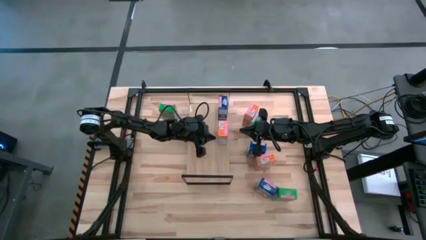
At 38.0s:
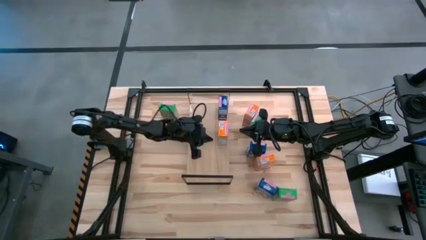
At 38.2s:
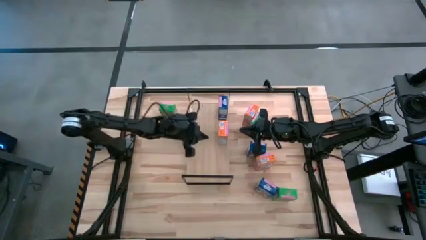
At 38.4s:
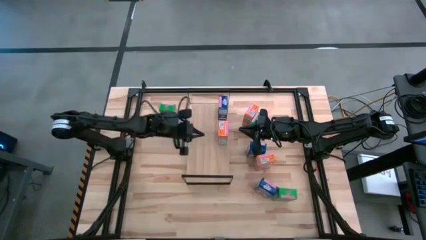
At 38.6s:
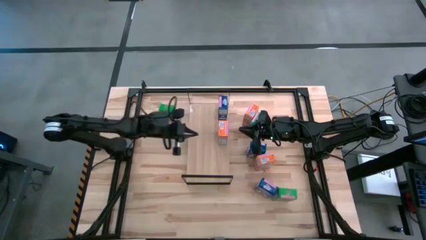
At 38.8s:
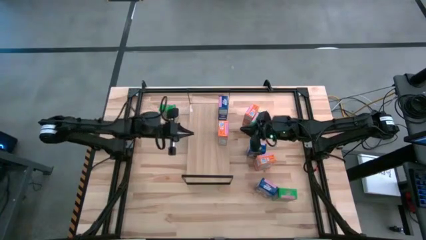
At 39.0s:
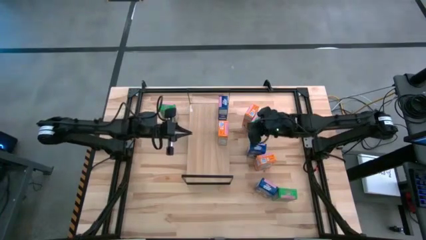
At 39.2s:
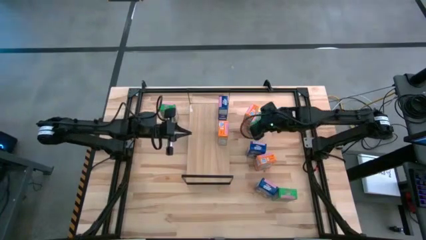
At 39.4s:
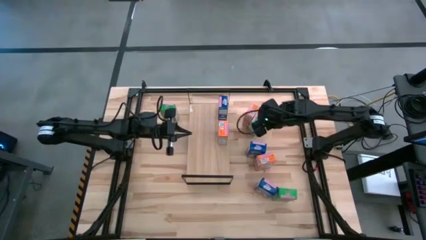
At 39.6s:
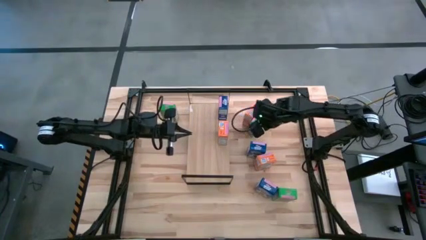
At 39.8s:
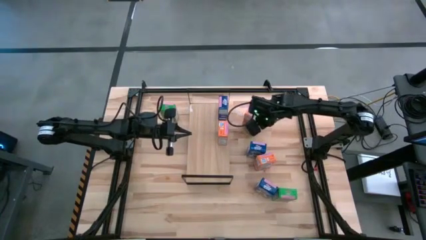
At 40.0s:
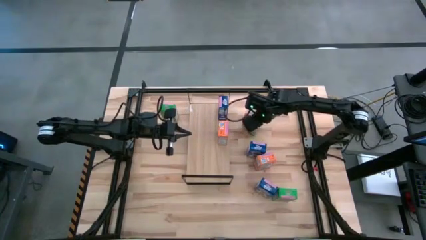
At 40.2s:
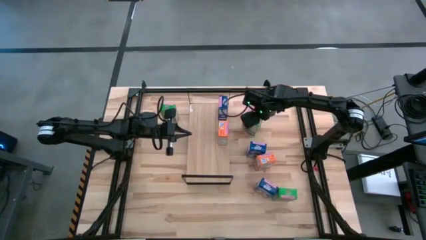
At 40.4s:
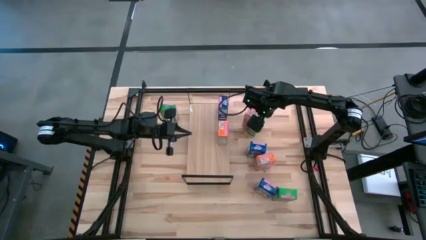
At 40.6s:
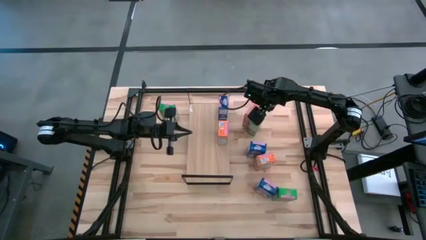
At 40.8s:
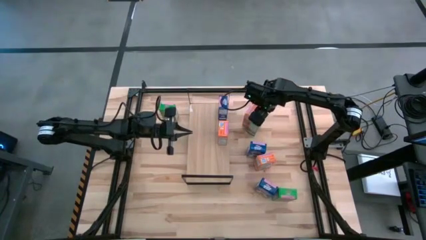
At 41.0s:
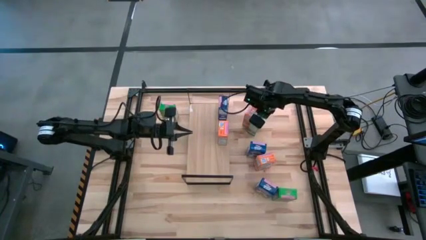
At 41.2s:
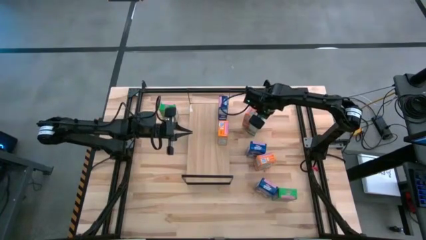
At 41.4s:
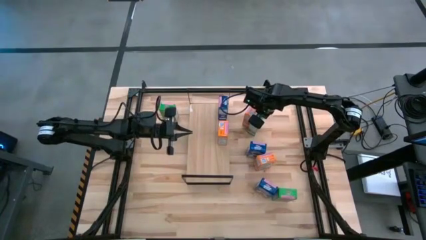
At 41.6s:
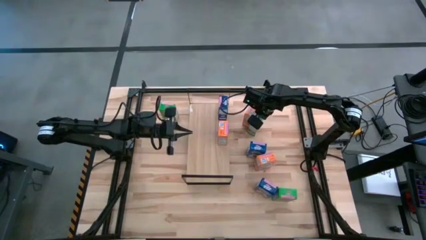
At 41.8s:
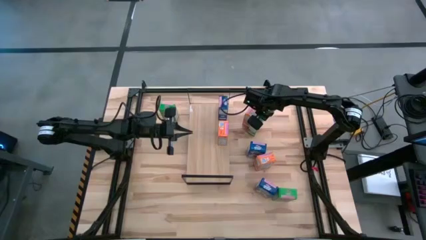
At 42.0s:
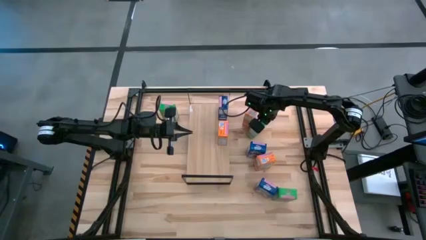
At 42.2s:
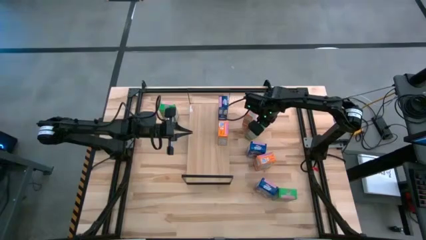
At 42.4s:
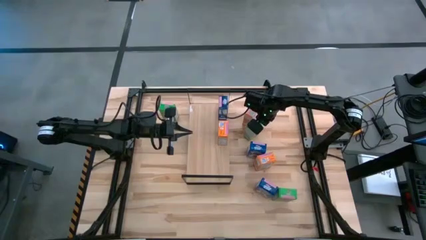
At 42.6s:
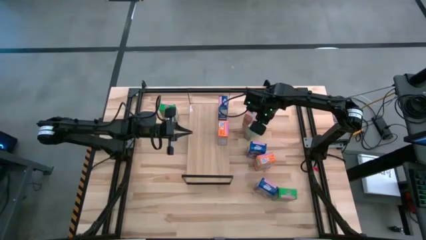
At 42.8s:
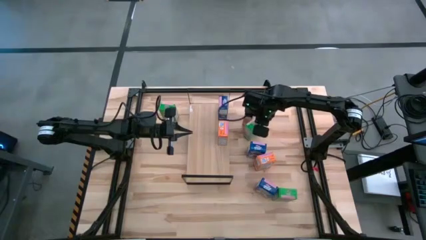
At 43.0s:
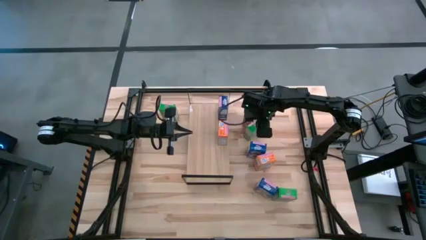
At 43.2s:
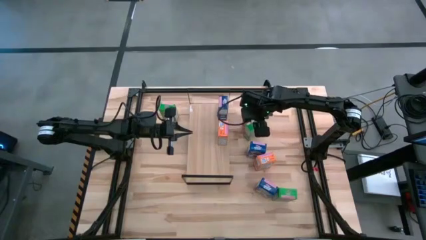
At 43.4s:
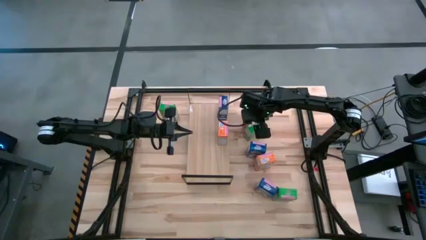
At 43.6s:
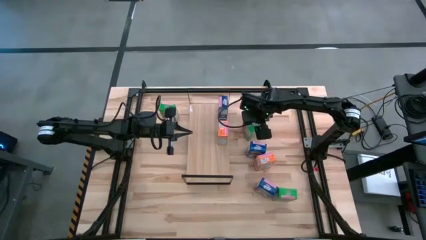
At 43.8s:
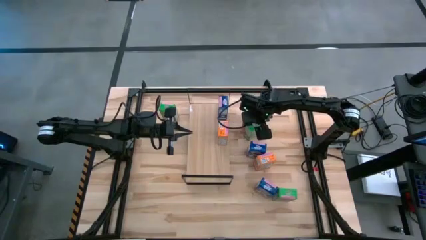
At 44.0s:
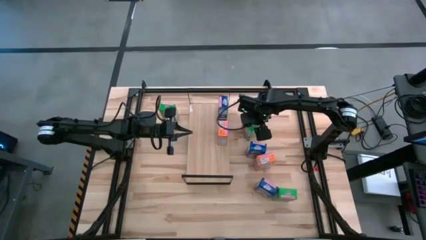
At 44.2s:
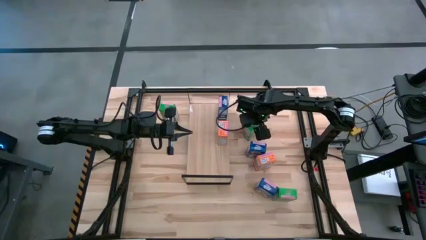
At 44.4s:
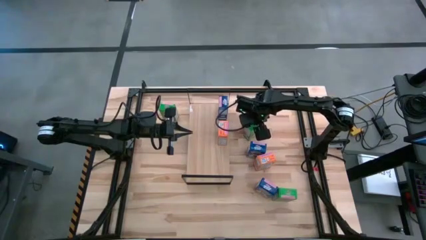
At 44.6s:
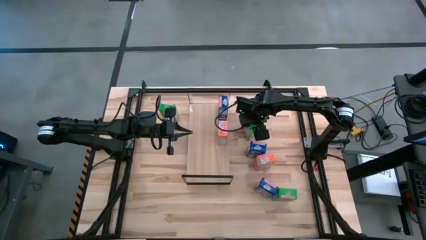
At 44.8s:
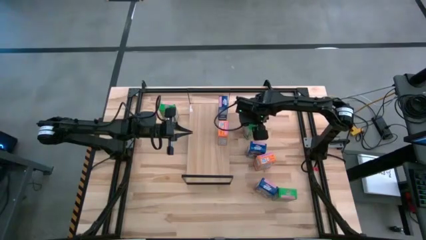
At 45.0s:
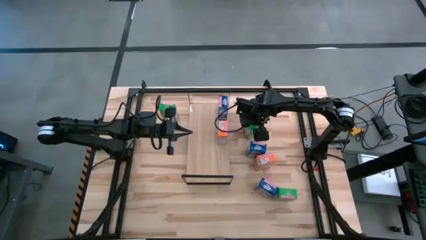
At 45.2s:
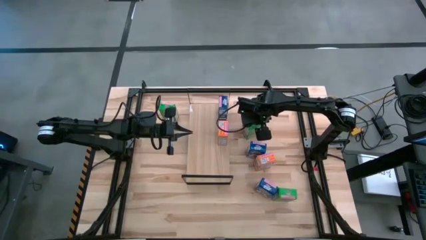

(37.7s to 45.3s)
Task: Stack cereal on shelf
Put the top right green cereal box on the shelf

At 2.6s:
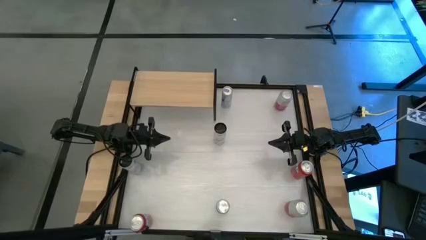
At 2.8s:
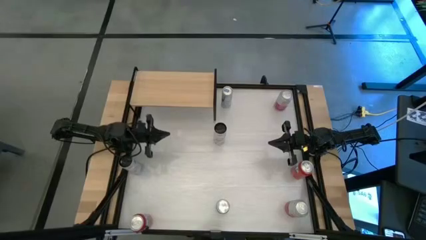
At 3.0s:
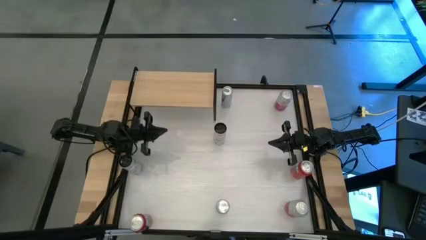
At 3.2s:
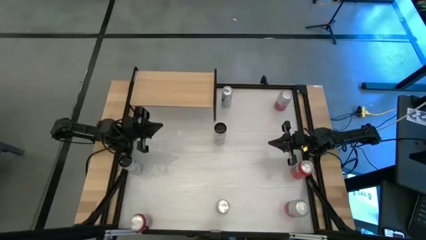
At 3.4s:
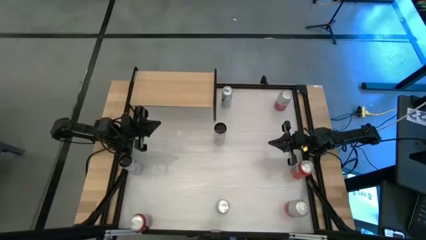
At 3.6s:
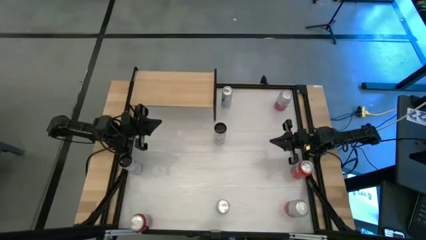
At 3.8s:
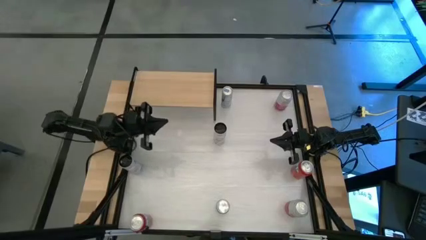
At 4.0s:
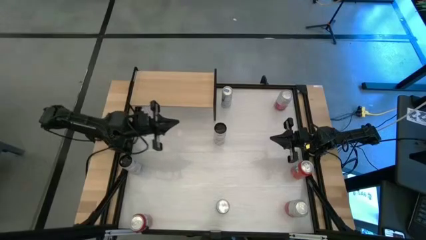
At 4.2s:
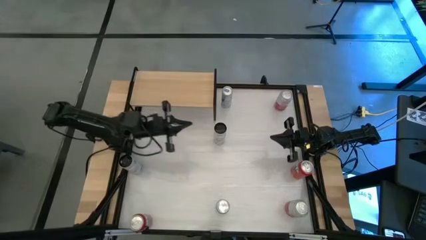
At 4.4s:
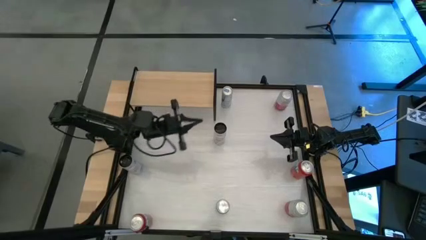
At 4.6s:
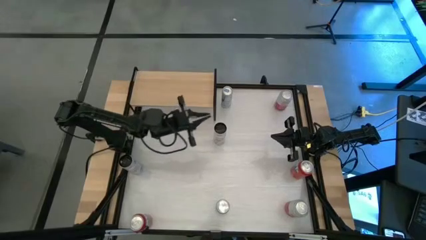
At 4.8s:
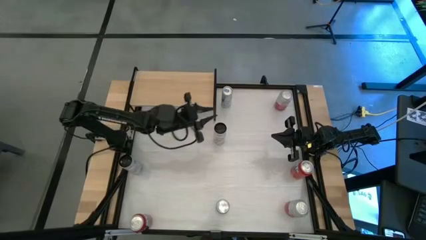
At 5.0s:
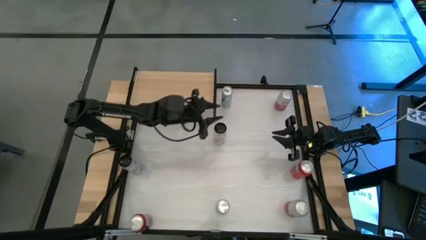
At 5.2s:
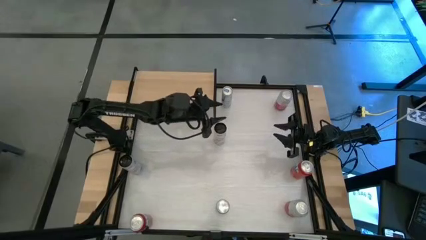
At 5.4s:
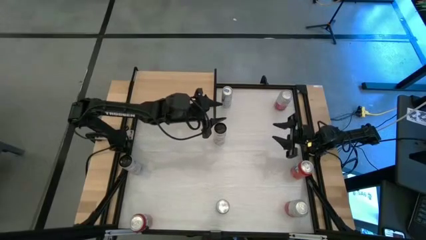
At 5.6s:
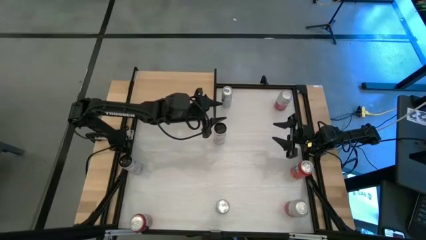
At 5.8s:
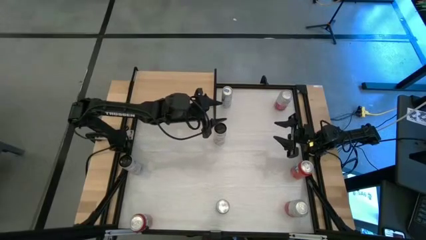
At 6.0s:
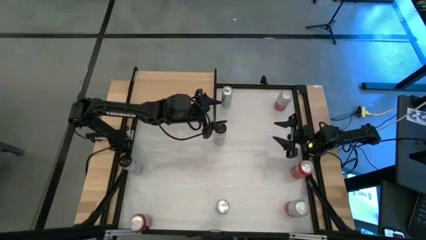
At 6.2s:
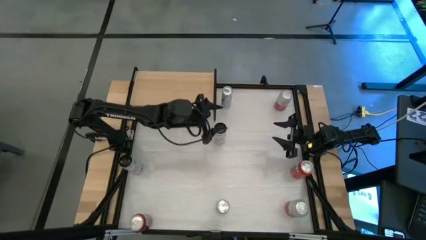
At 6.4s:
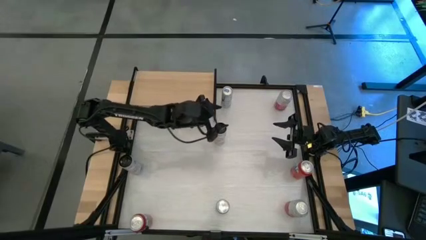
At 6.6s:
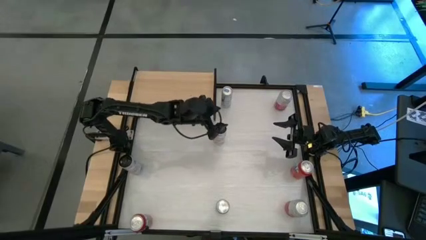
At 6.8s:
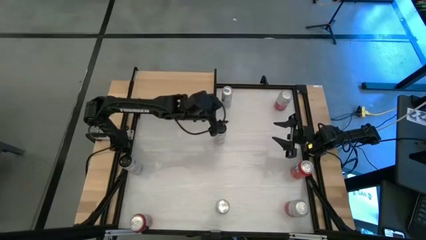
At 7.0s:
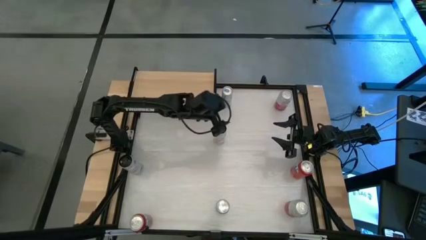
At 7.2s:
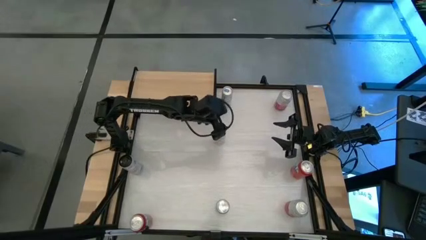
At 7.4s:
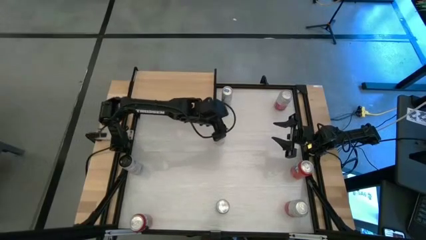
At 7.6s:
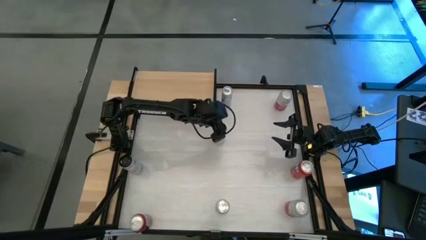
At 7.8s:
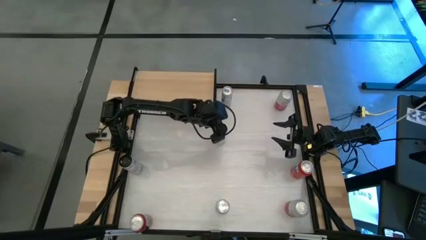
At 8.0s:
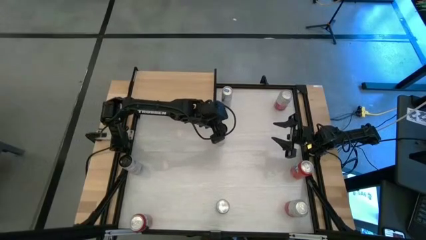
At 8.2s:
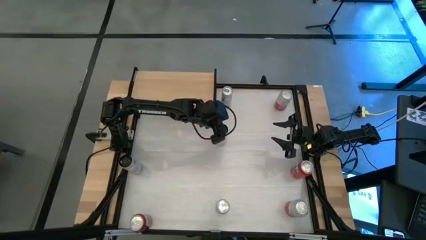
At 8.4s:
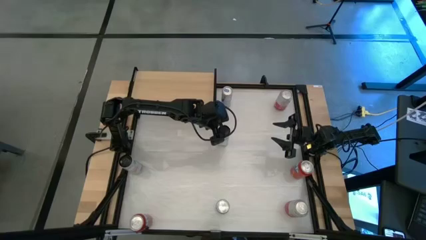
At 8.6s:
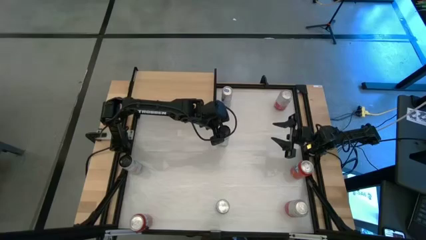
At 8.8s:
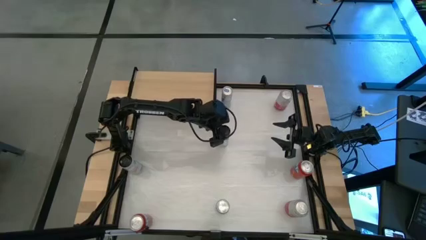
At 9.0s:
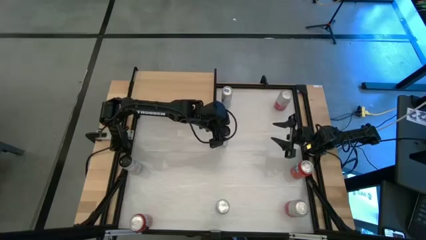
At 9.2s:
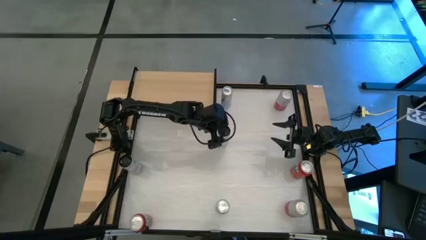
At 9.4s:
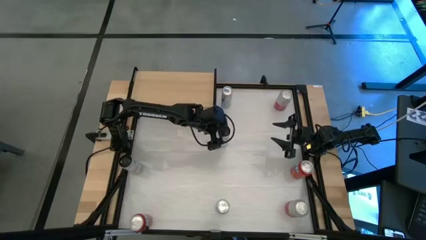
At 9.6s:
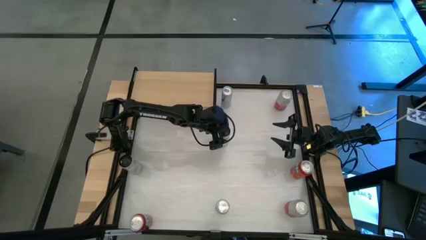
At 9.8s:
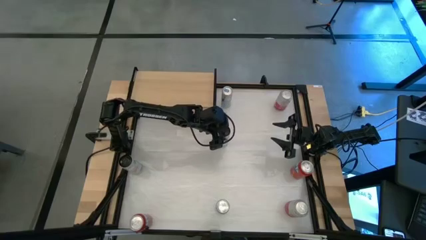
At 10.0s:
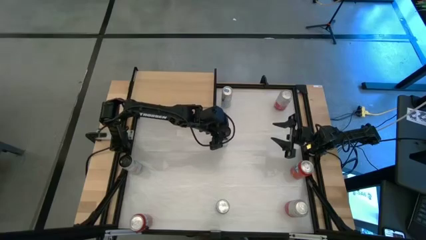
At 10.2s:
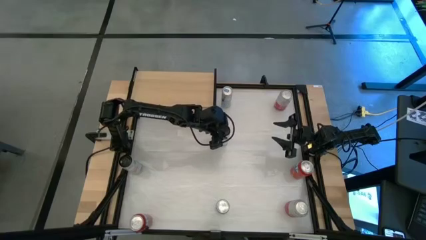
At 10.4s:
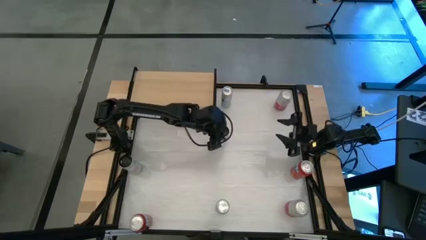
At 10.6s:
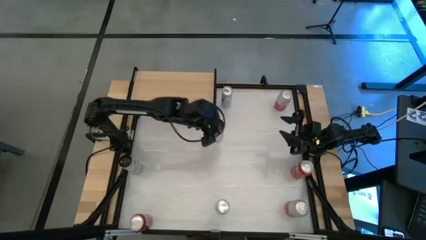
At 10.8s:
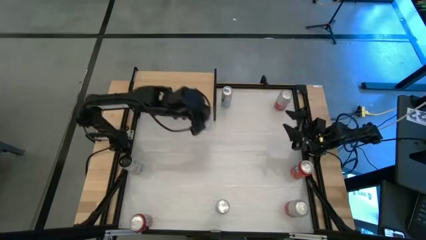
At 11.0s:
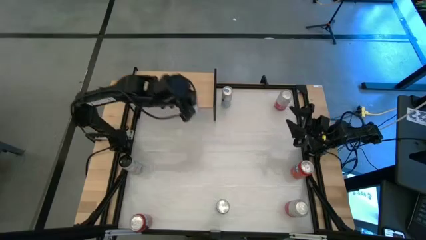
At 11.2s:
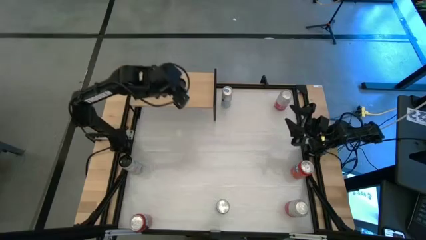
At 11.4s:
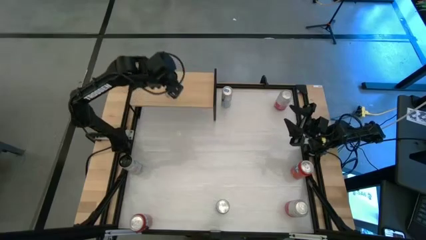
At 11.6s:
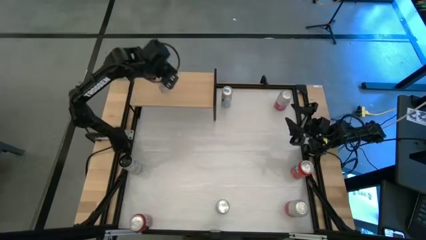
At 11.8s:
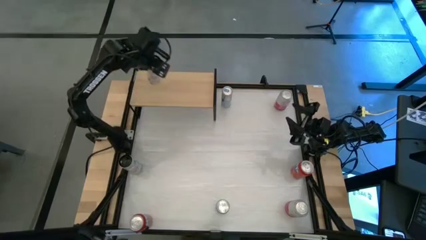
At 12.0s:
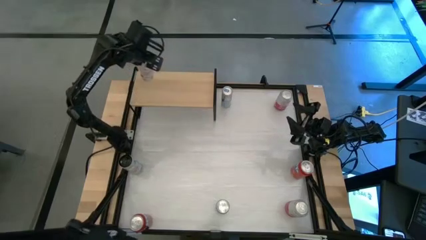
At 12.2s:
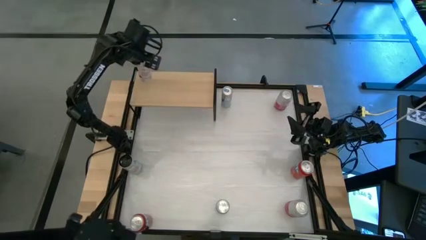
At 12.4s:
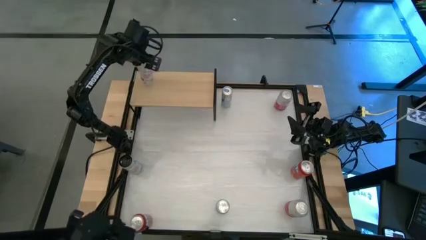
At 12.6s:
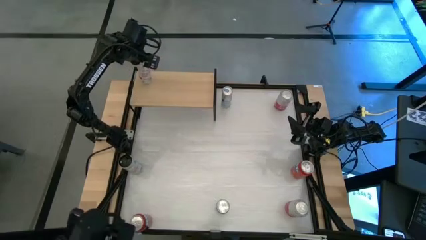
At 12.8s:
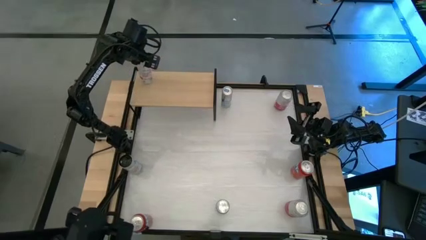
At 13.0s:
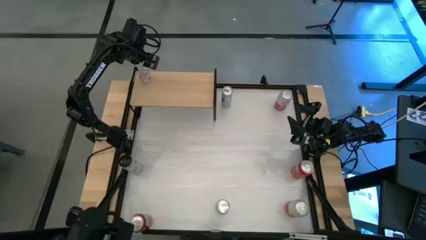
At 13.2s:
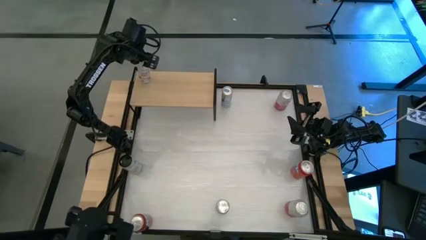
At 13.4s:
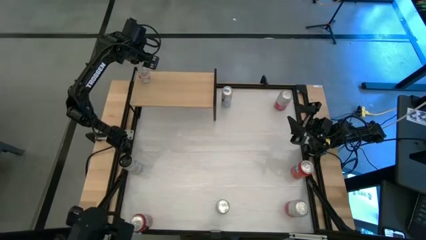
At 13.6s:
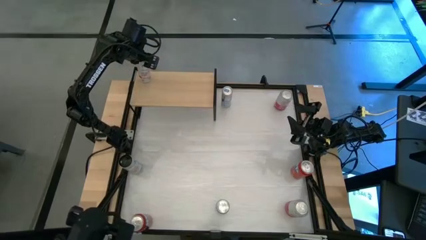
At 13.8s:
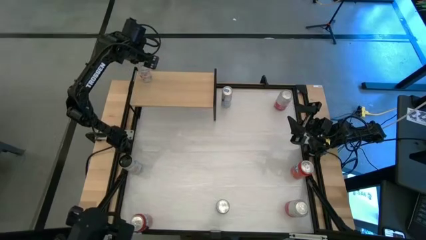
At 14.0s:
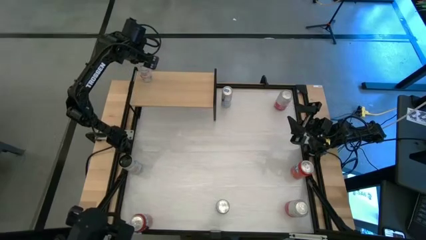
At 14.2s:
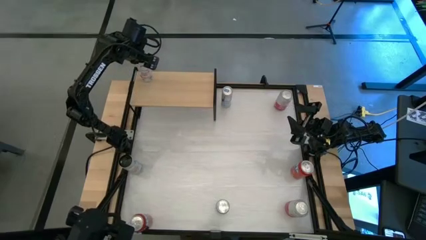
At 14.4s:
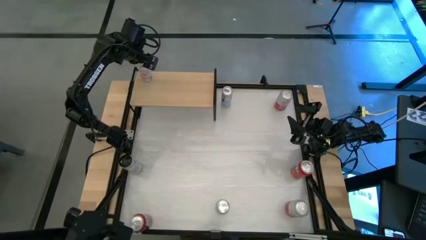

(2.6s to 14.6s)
Task: Place canned beverage on shelf
Put the top white pink soda can on the shelf
